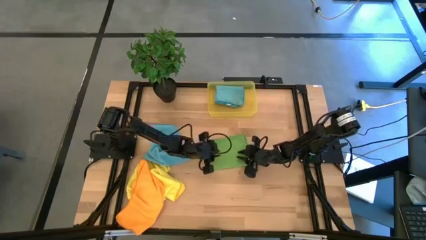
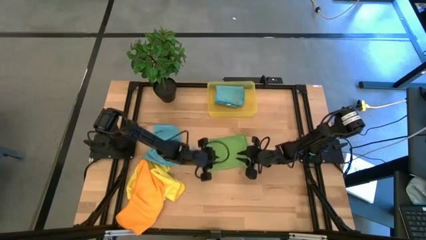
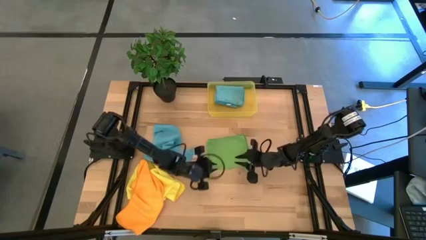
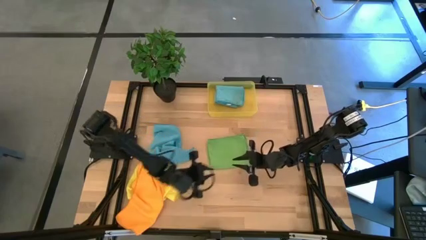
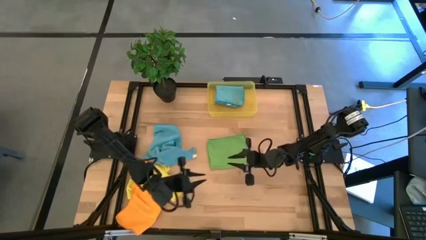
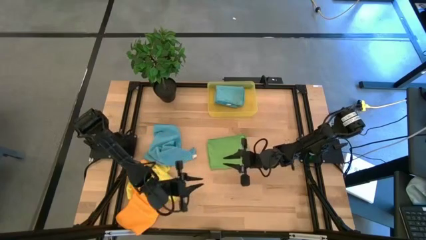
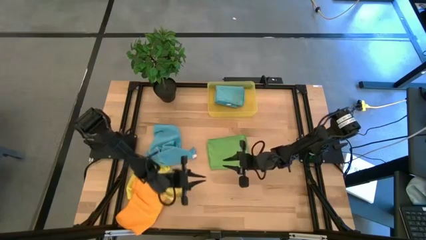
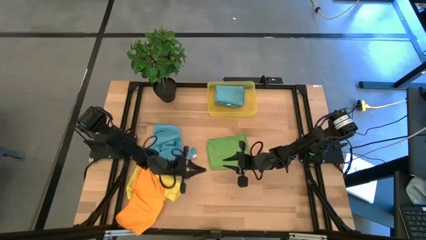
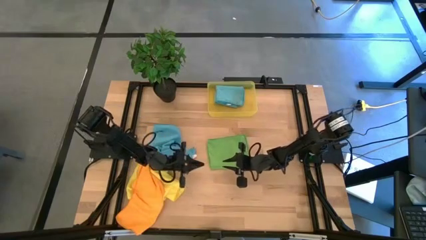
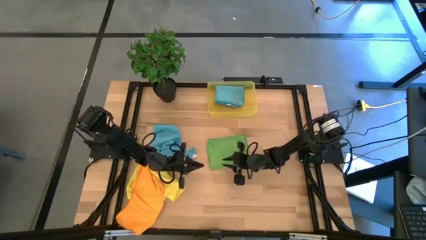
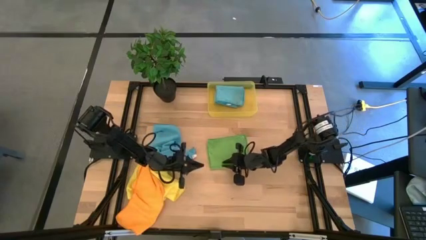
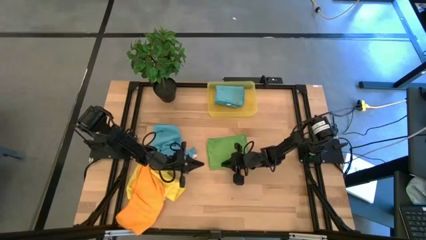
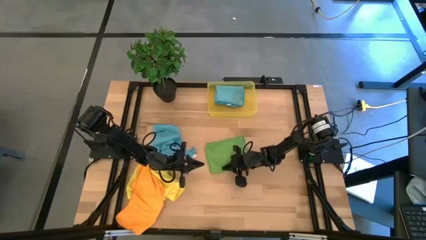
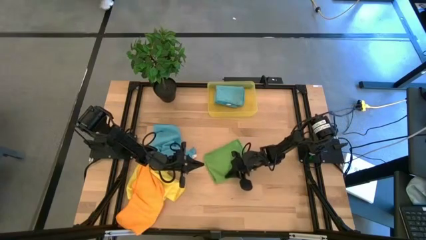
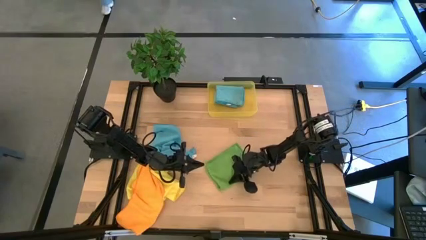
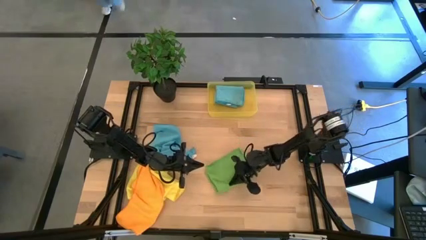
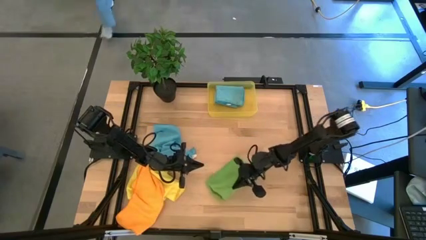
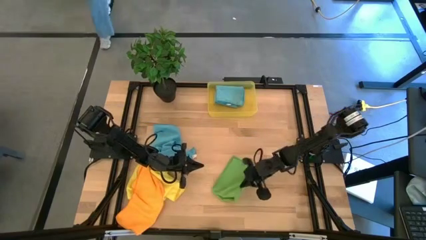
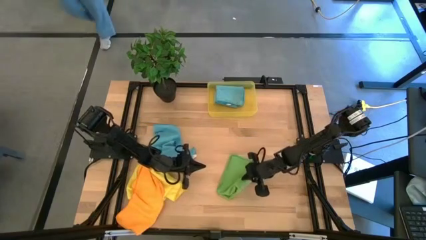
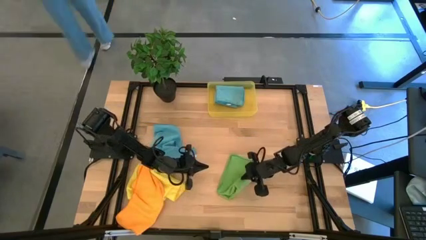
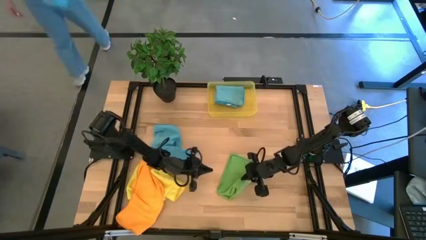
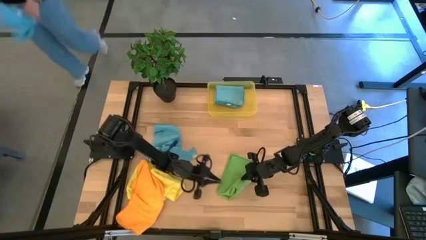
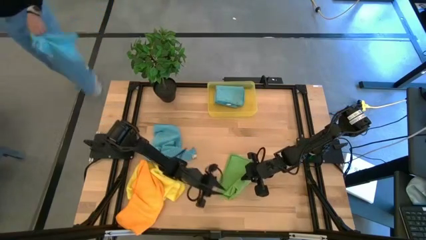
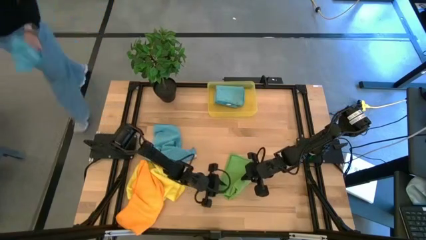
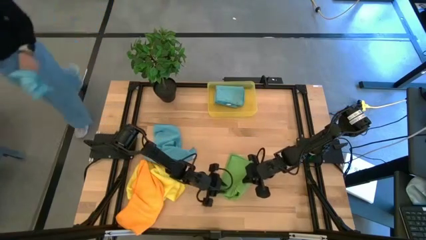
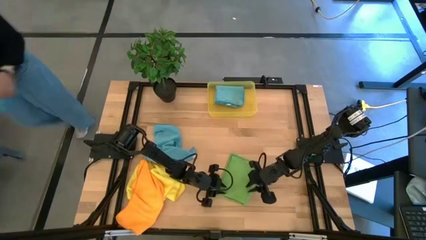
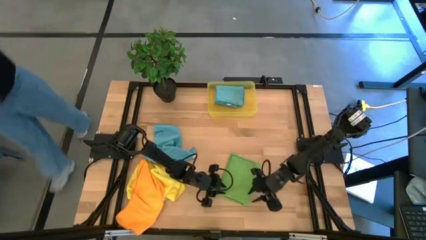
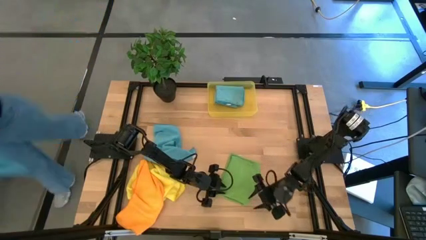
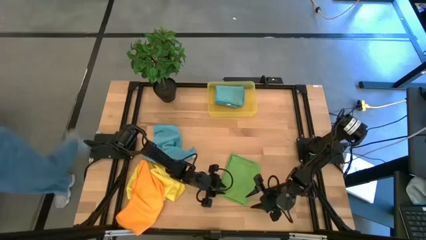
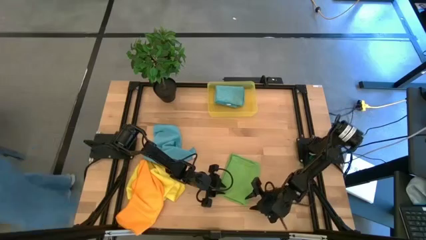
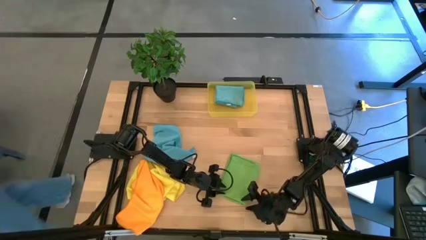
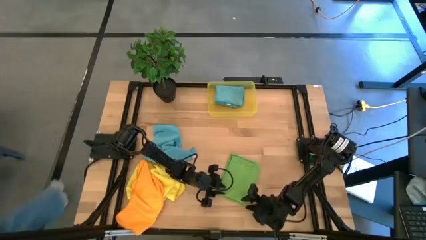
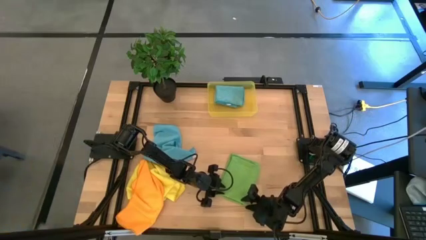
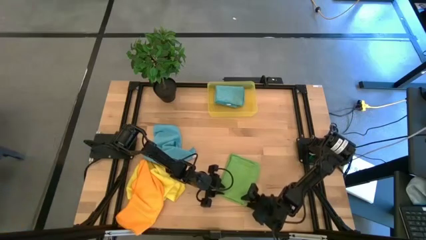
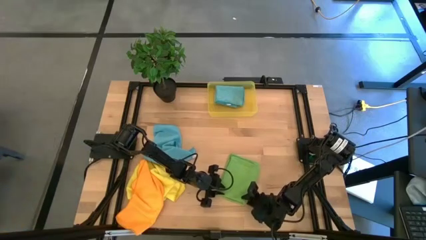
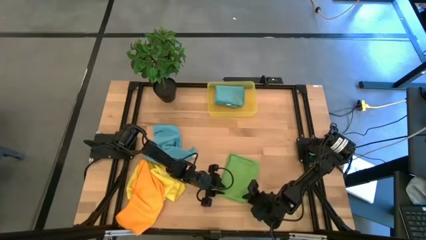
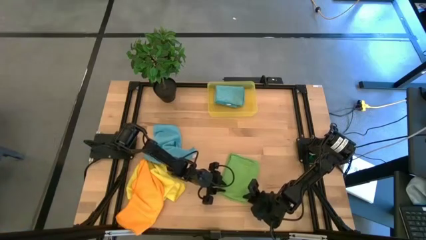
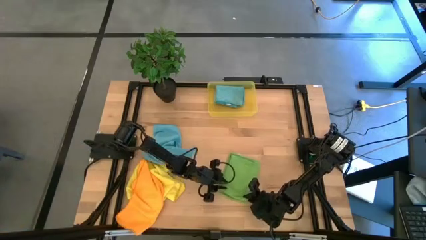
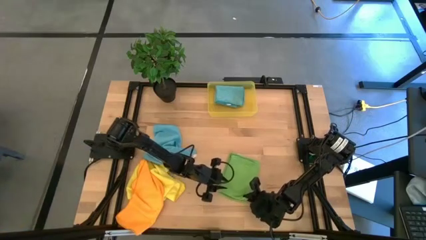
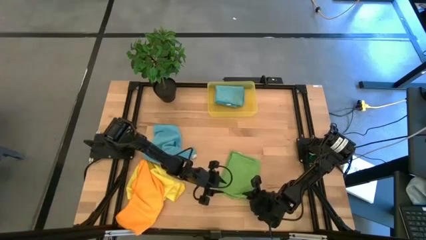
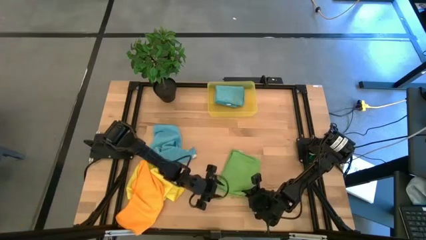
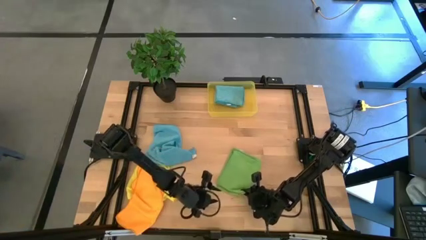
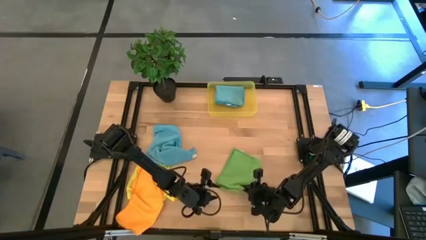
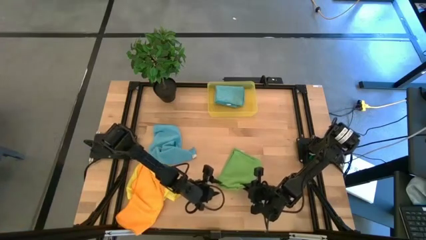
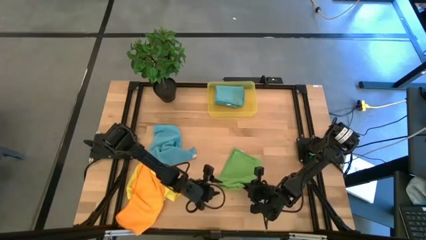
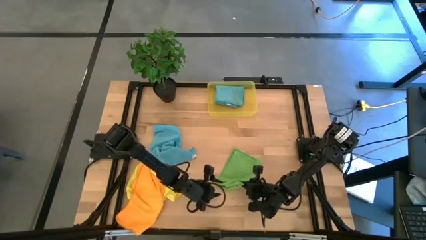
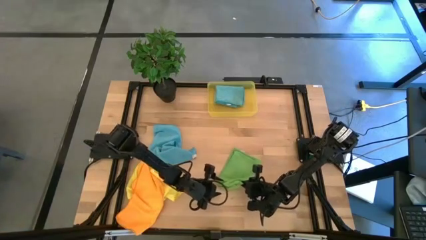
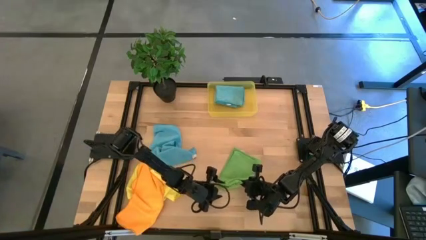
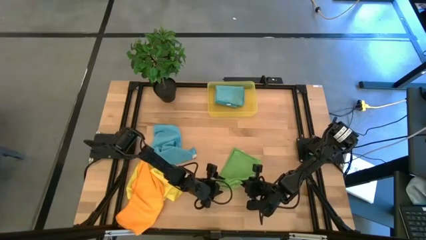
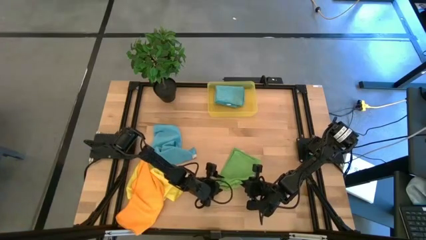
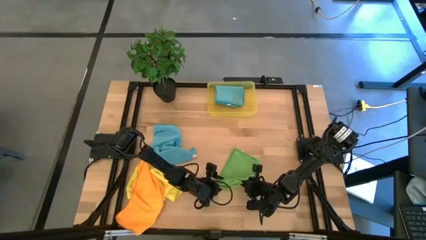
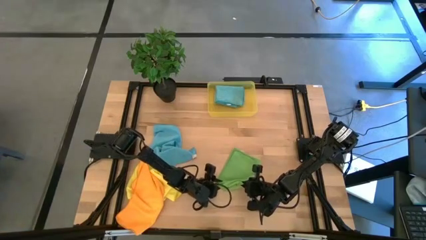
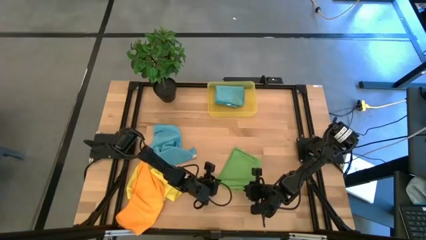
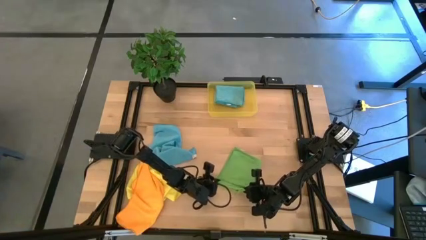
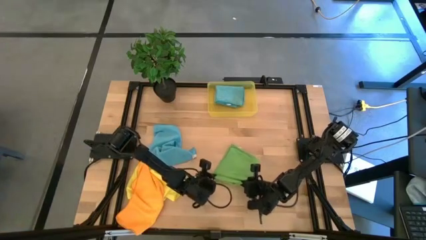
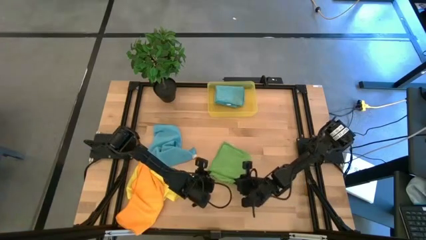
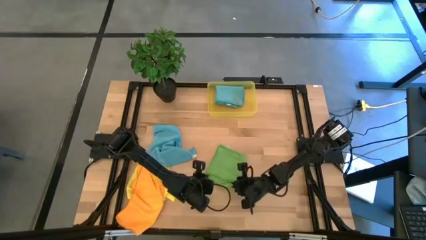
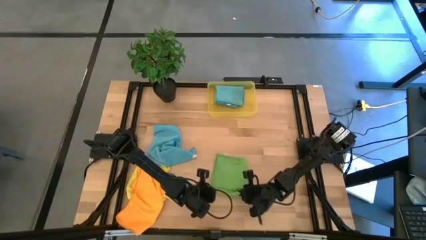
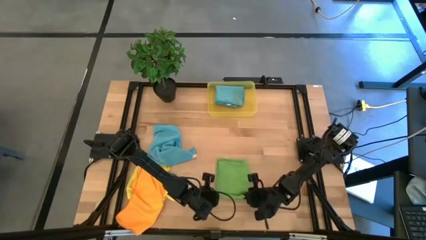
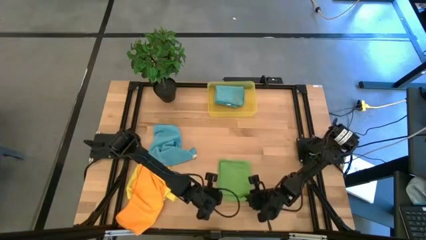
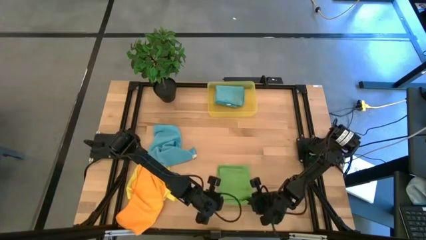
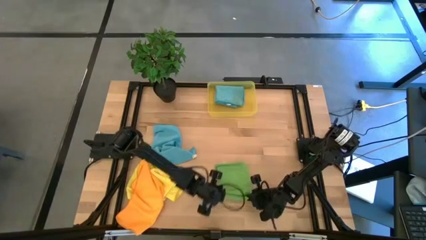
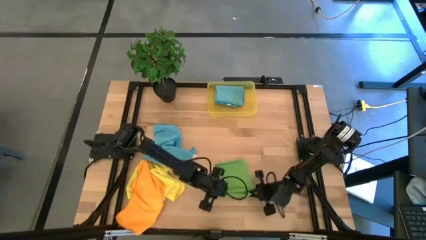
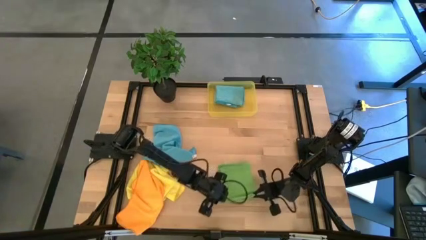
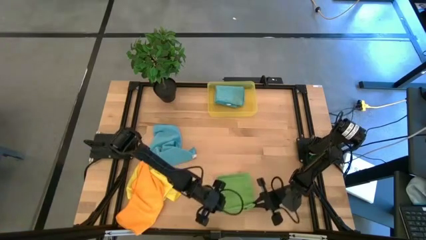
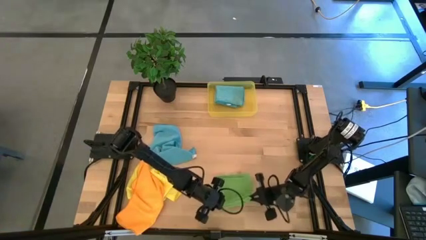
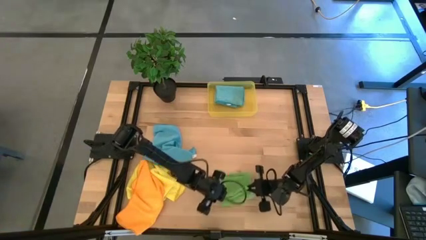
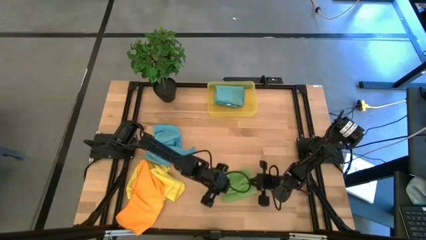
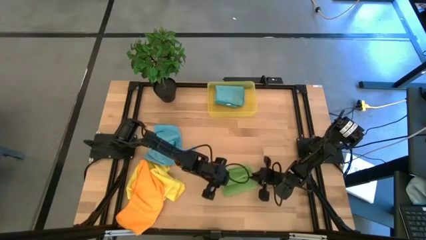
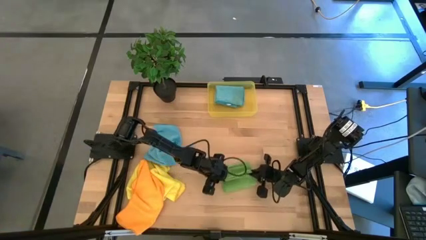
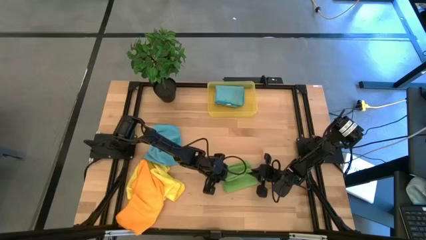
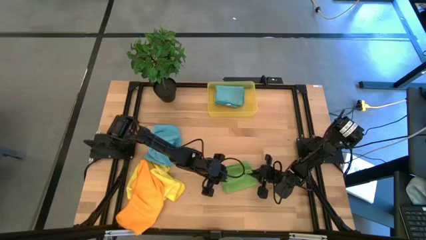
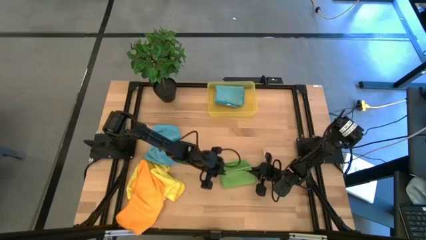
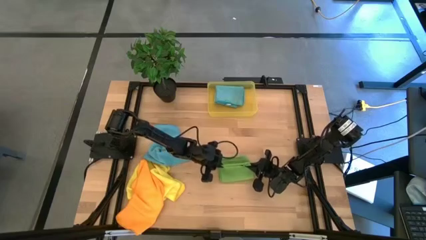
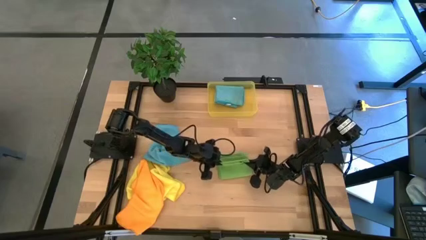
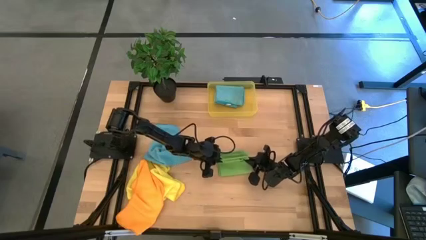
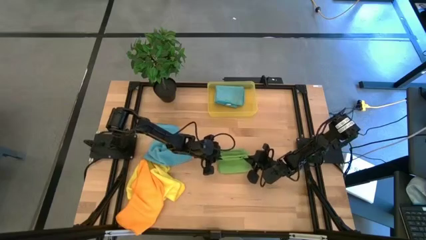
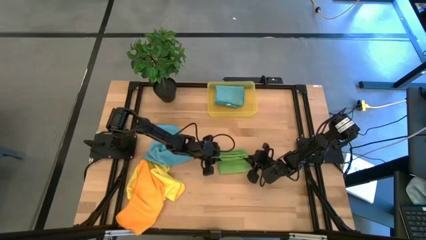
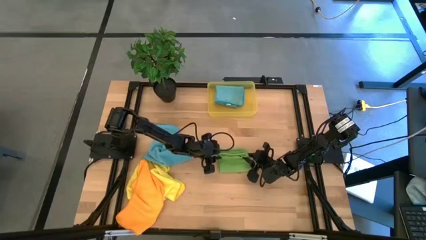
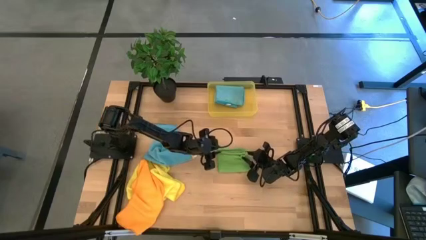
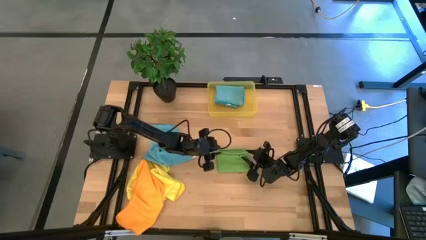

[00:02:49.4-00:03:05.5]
Task: Fold microfiber towels
Fold the green microfiber towel
